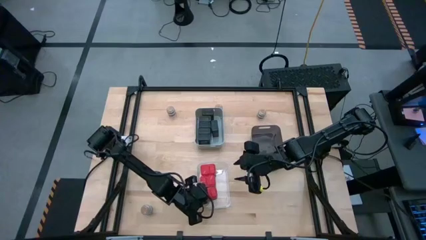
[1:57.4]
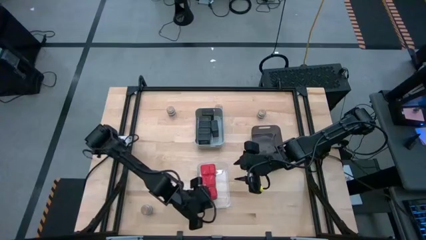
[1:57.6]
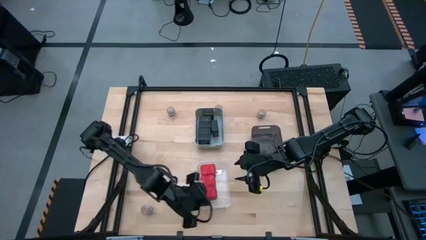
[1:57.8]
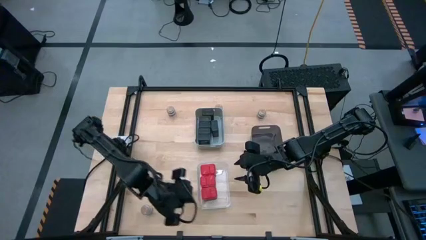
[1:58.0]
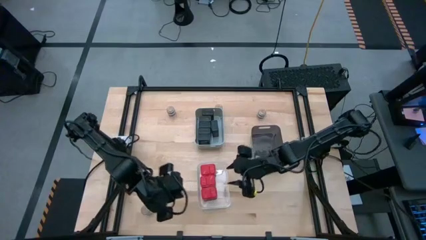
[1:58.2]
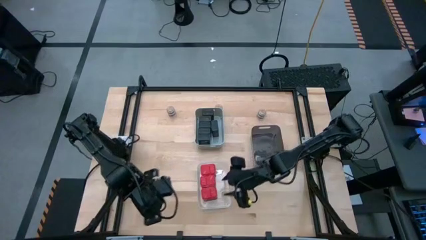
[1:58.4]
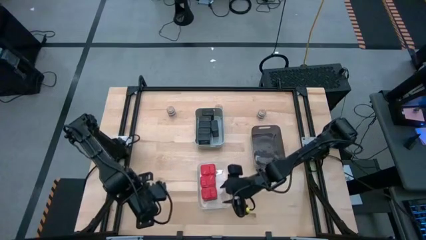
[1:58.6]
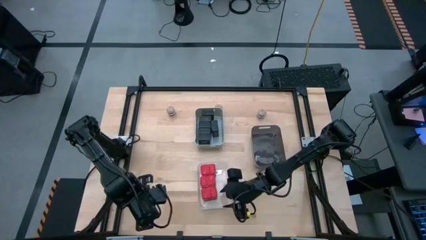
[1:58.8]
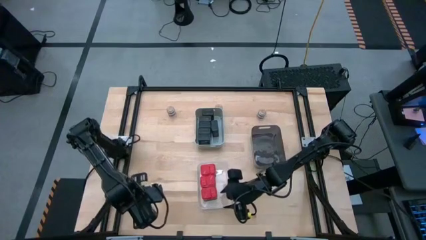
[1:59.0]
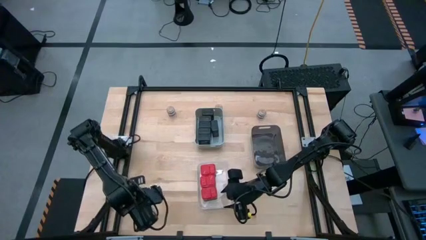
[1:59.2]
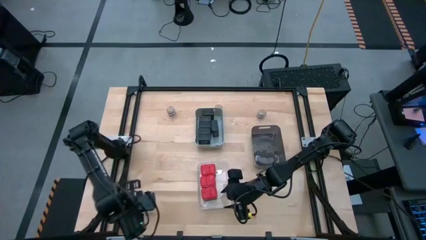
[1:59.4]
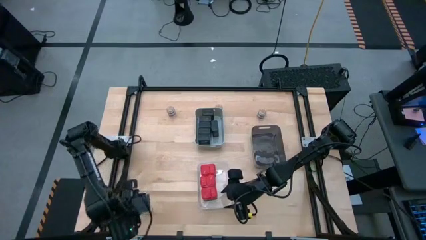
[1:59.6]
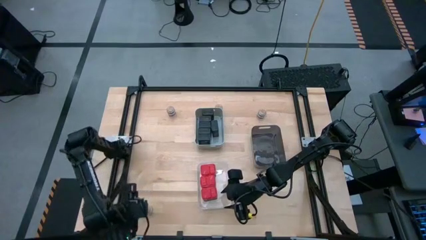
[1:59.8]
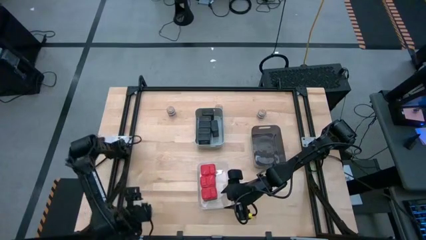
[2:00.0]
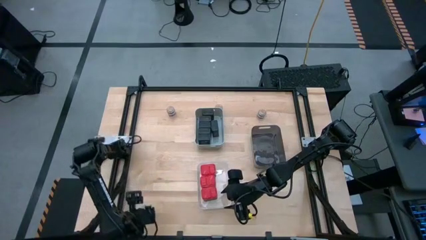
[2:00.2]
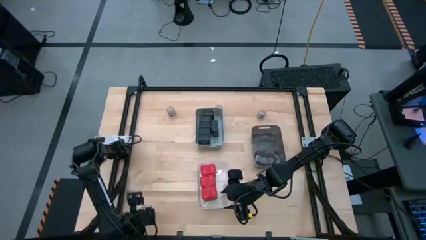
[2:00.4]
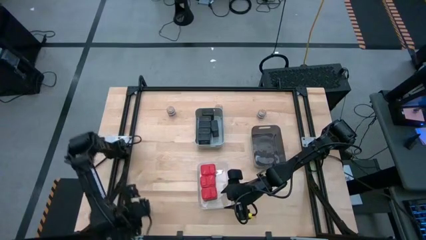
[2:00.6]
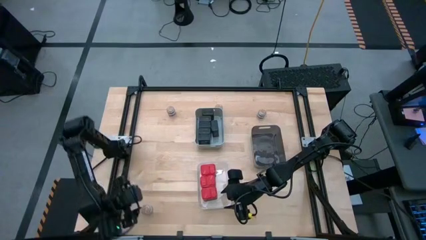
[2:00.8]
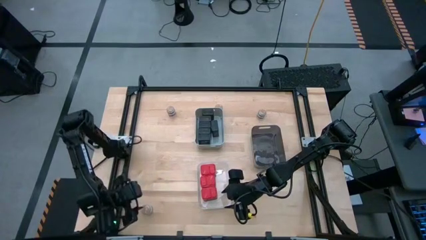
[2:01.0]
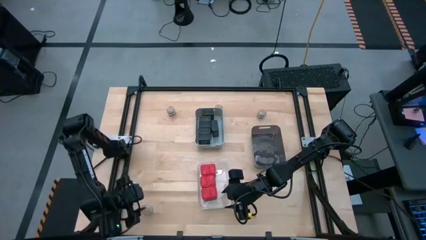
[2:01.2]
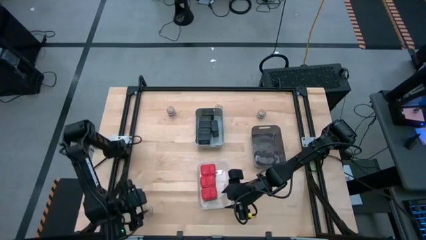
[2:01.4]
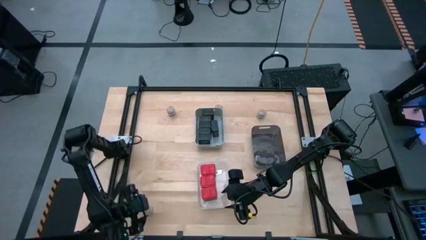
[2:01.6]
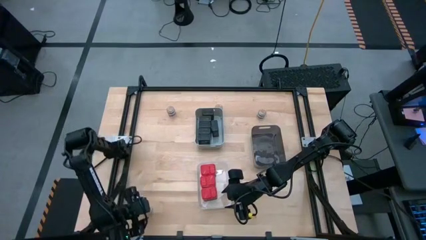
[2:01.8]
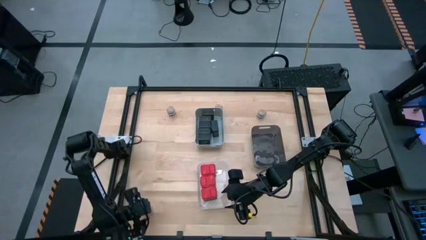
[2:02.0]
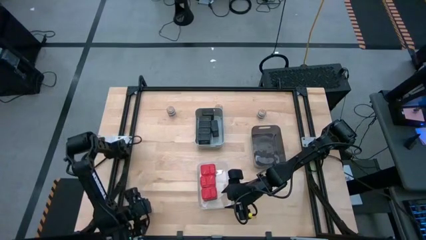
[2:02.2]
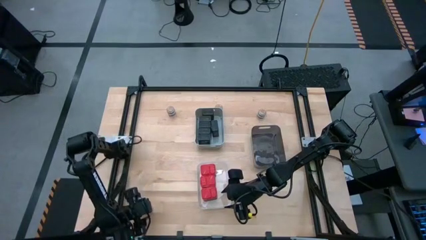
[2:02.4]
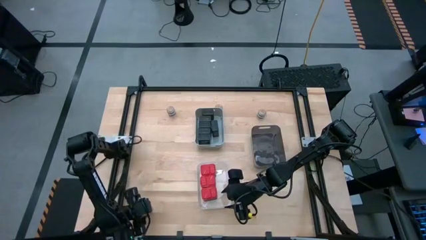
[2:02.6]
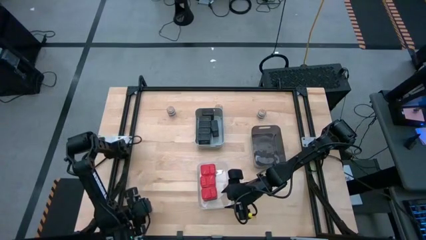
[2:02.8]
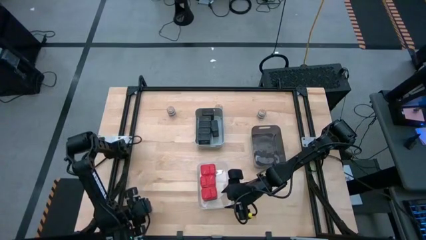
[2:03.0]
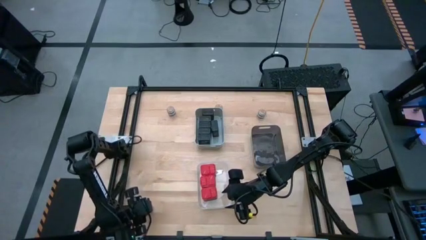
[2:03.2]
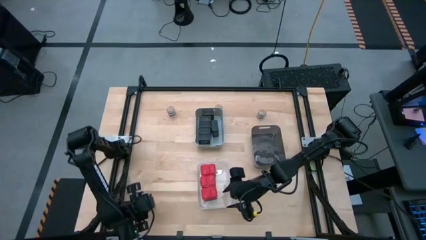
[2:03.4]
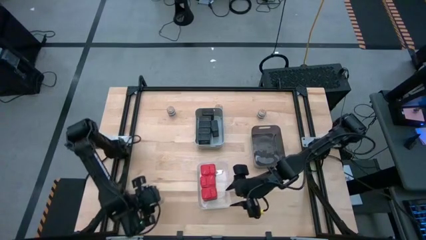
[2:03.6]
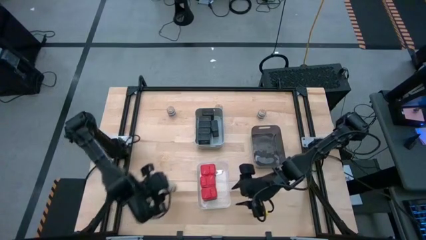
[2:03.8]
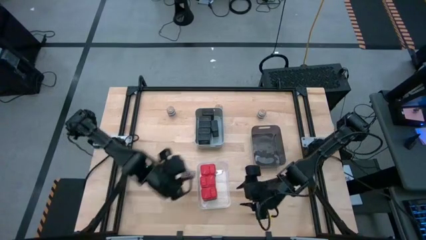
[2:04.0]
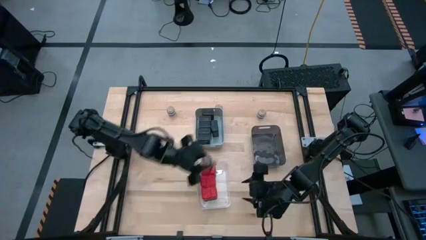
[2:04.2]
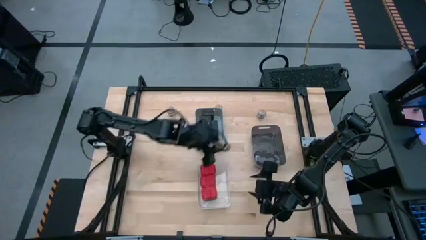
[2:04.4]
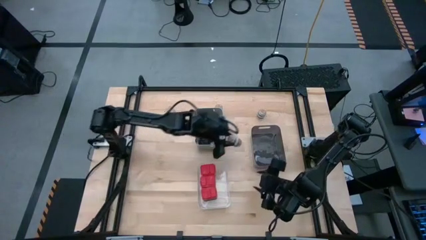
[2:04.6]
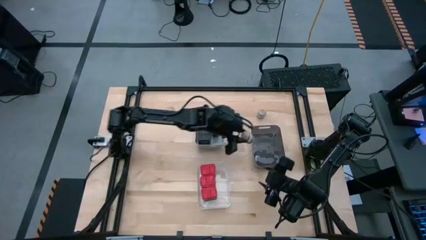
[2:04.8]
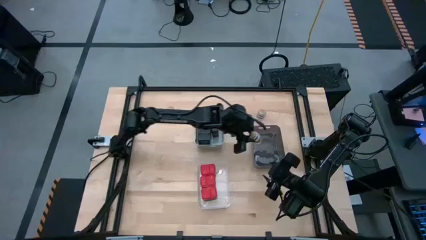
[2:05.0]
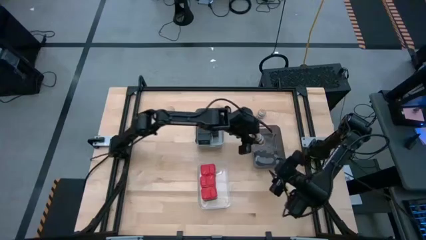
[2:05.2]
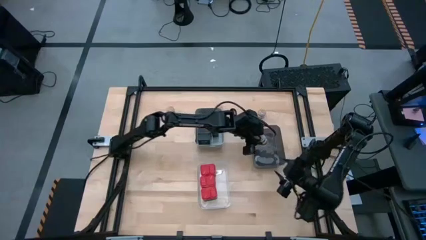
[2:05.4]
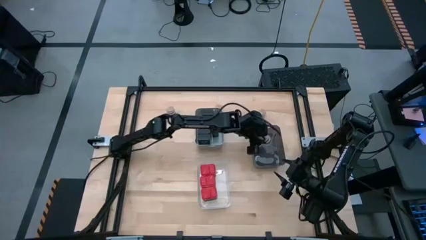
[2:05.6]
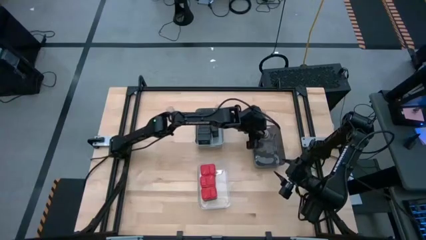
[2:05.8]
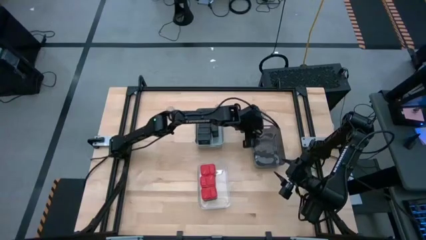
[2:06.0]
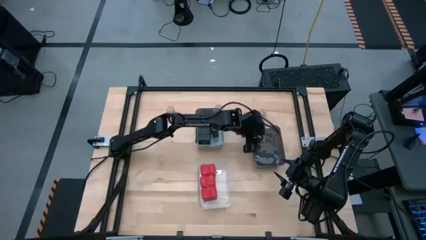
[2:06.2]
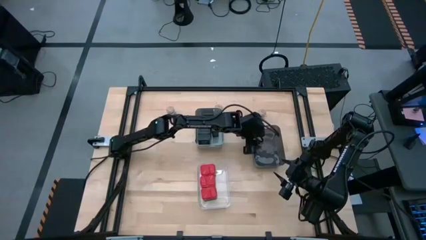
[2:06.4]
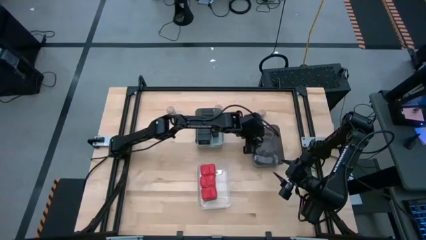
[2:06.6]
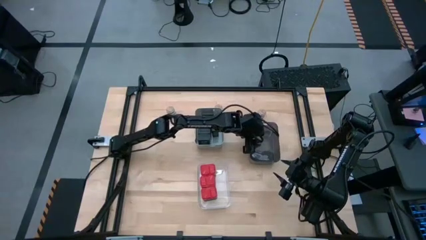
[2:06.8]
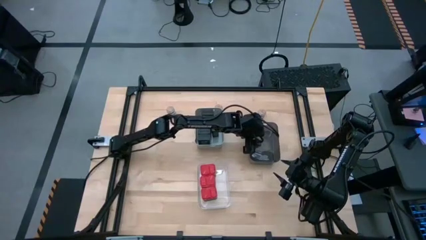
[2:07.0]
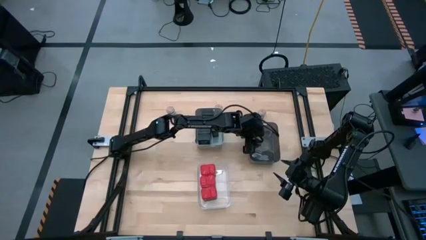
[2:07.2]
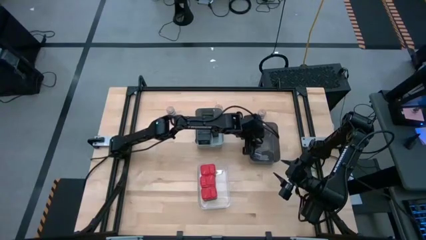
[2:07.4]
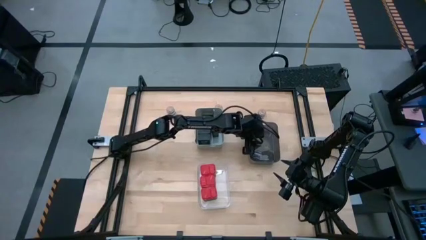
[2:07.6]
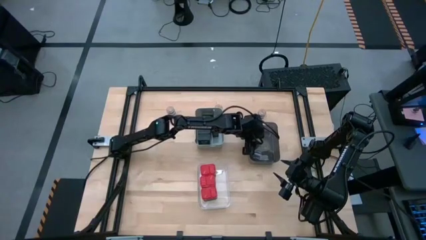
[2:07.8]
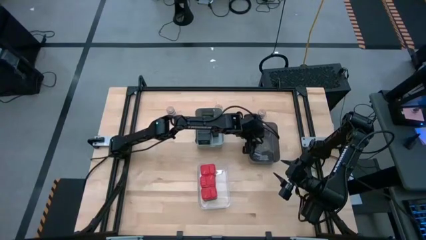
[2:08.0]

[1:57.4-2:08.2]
Task: Sort spices by type
Put the brown spice bottle into the black bin

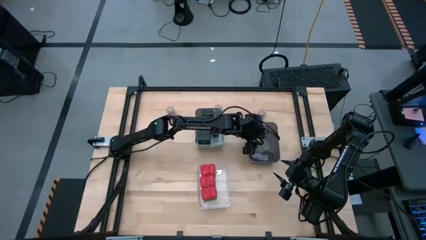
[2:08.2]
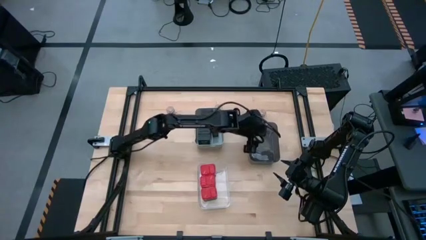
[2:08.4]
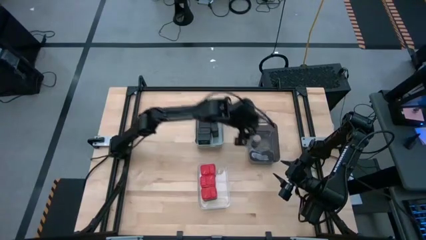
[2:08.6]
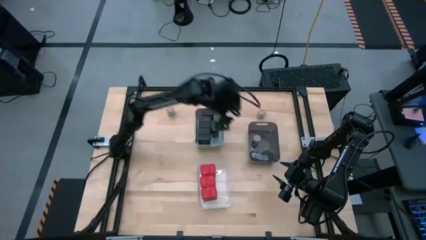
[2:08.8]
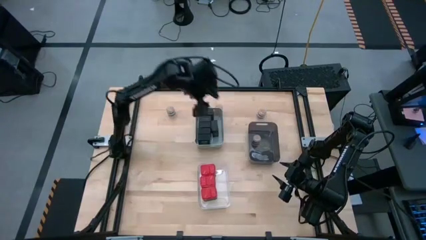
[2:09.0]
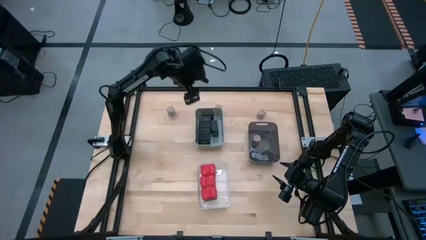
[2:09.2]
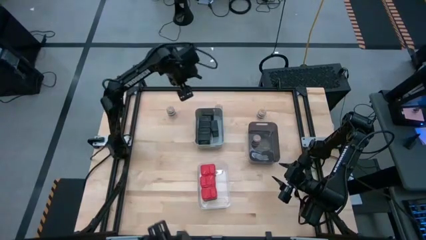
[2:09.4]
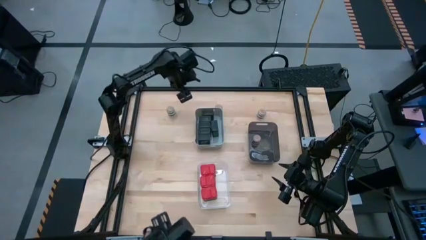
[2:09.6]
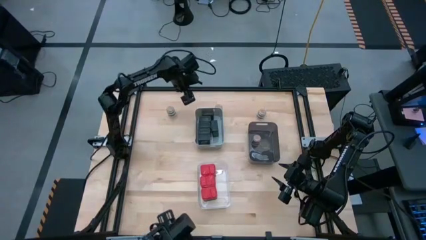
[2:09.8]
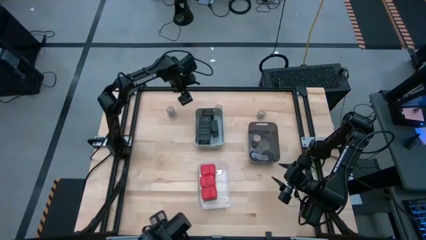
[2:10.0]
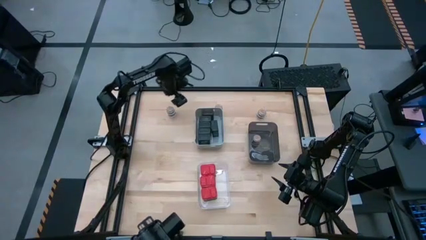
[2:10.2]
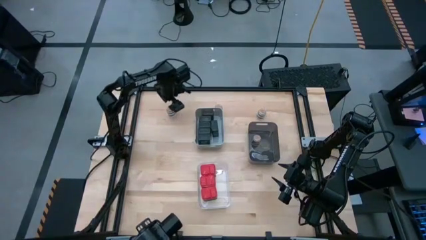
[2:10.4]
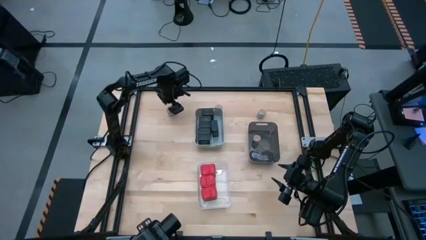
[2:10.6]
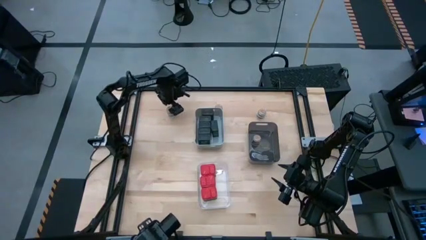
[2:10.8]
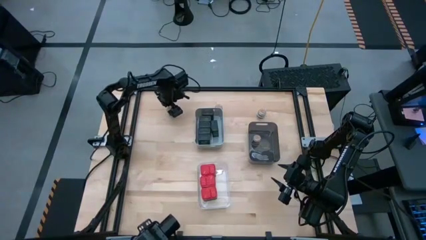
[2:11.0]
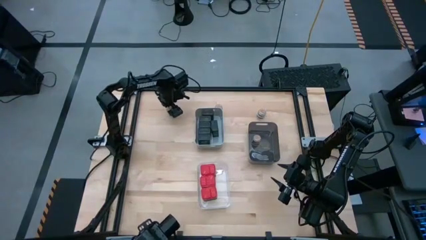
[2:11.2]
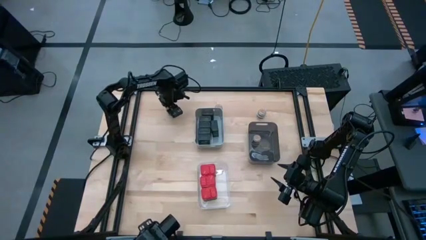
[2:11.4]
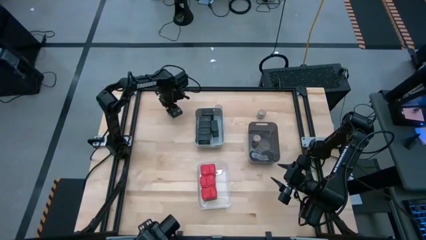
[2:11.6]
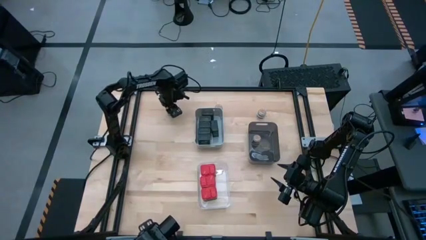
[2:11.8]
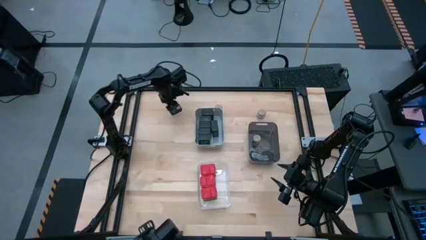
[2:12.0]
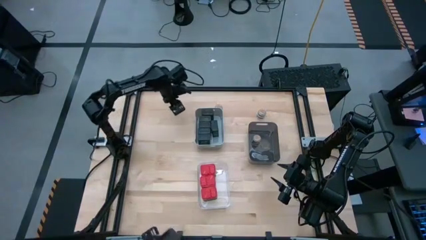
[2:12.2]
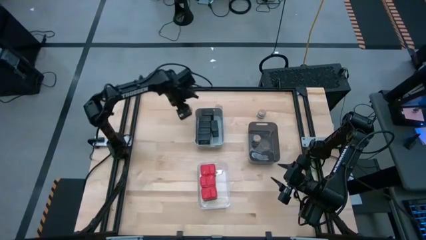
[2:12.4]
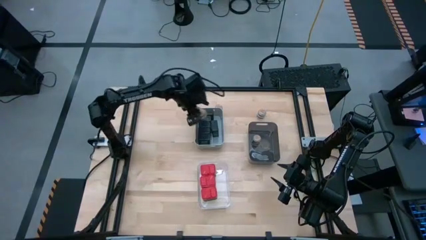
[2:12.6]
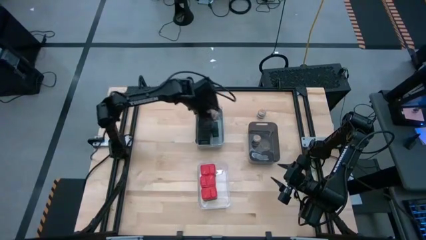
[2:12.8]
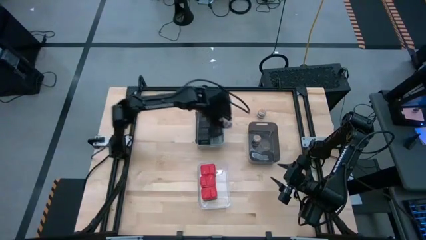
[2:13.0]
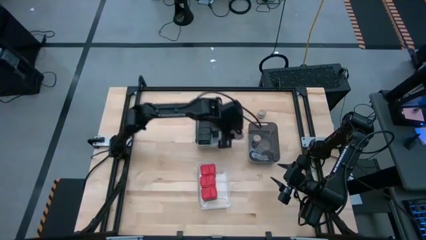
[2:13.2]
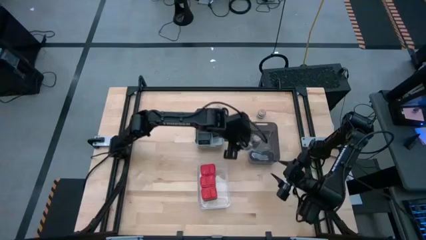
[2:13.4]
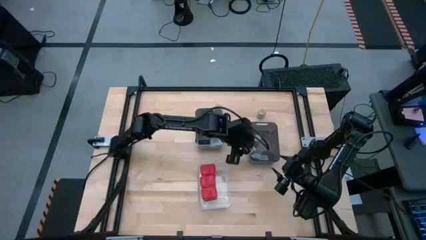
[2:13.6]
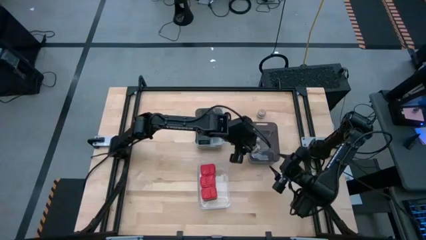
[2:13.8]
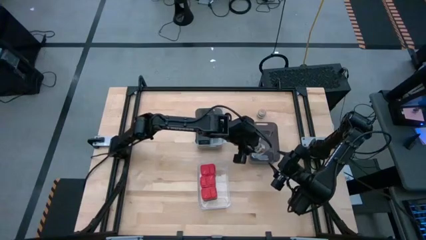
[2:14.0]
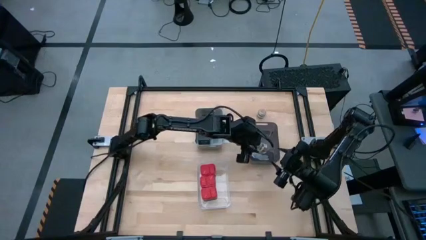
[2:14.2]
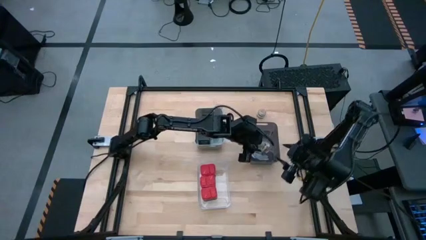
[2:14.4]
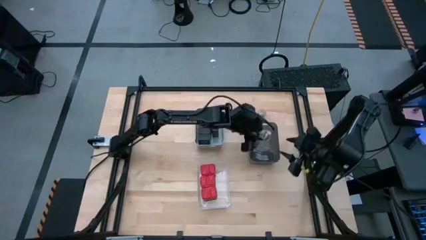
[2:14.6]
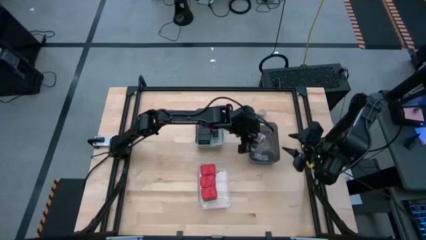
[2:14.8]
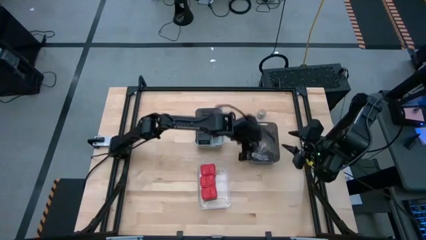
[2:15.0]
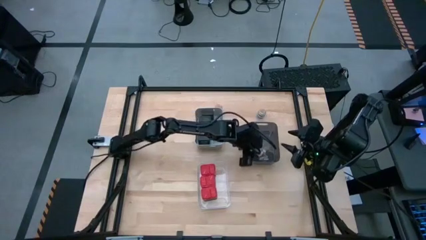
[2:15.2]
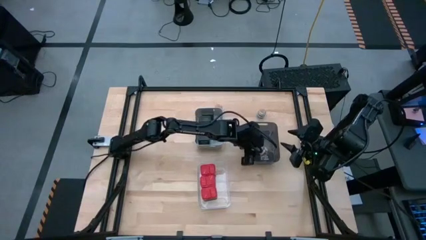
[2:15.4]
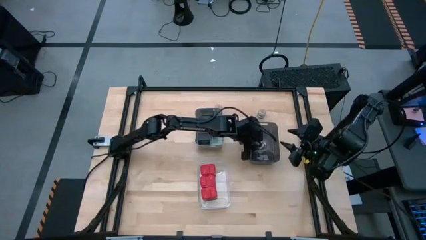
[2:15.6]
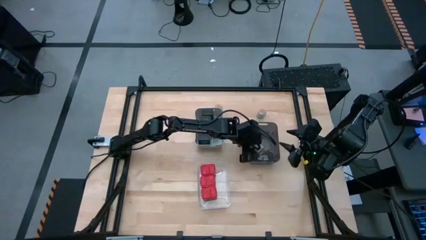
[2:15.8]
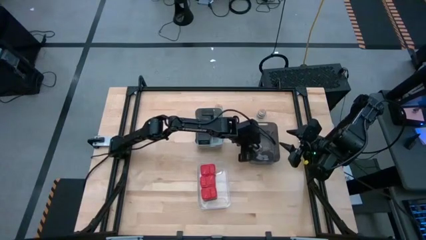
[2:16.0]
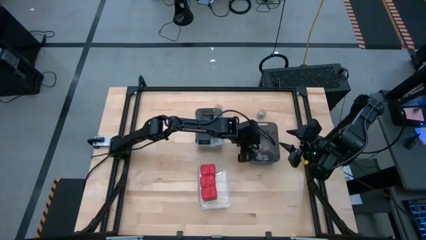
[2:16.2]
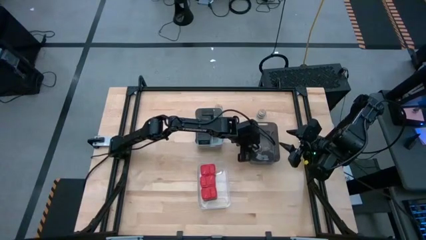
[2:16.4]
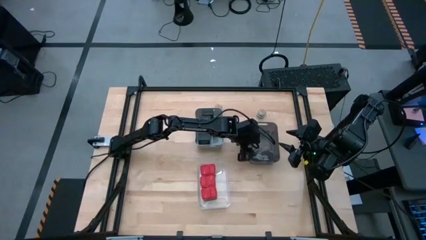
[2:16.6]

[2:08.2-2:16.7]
Put the brown spice bottle into the black bin
